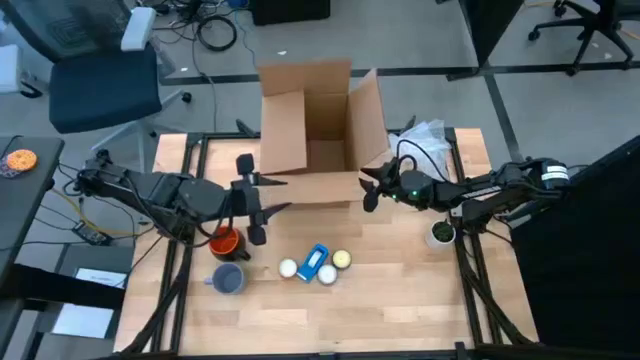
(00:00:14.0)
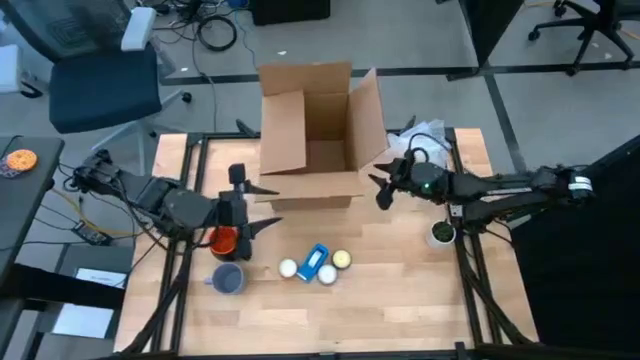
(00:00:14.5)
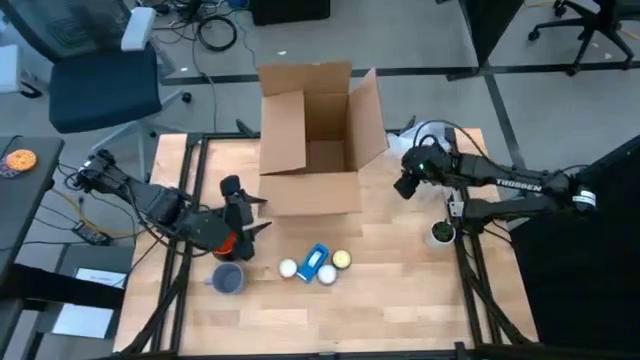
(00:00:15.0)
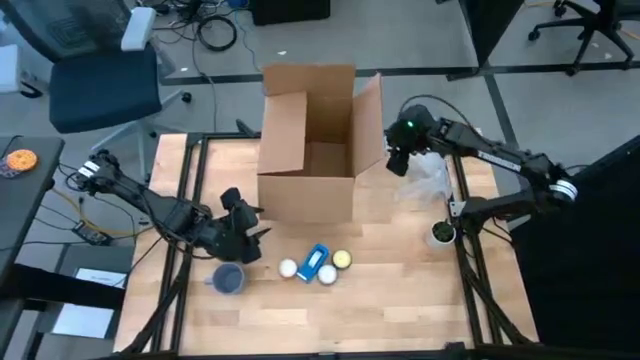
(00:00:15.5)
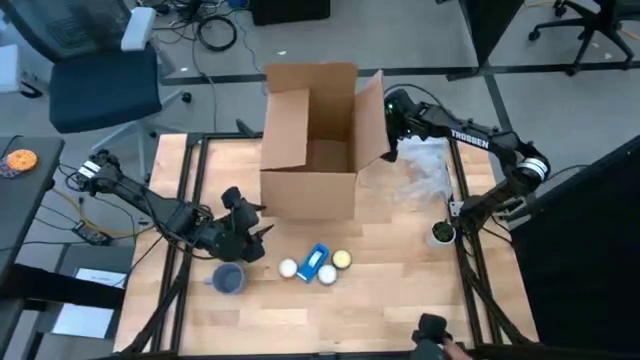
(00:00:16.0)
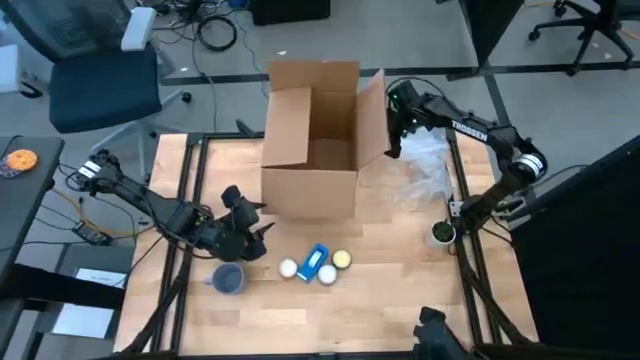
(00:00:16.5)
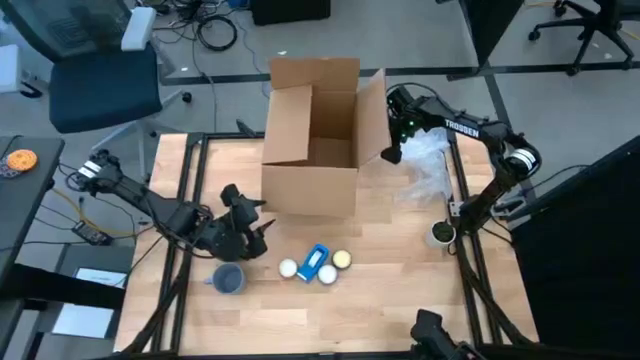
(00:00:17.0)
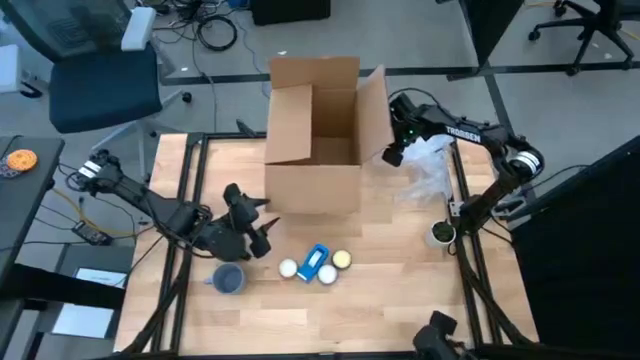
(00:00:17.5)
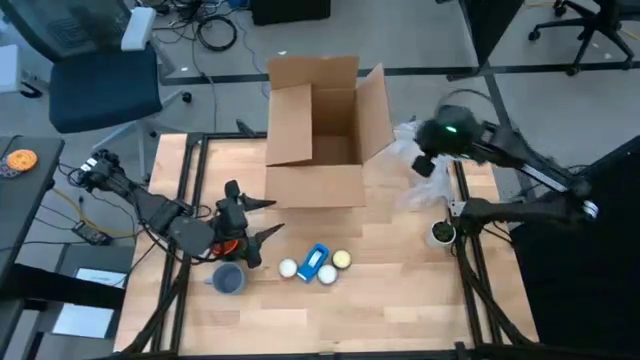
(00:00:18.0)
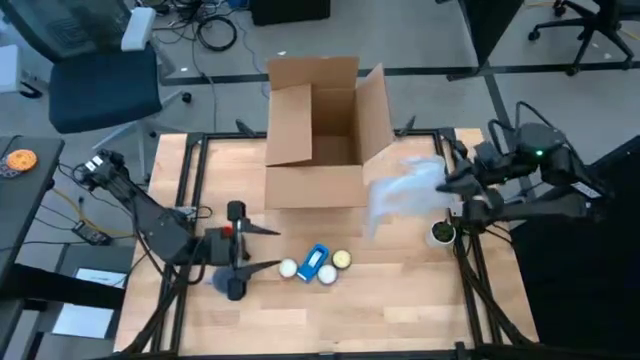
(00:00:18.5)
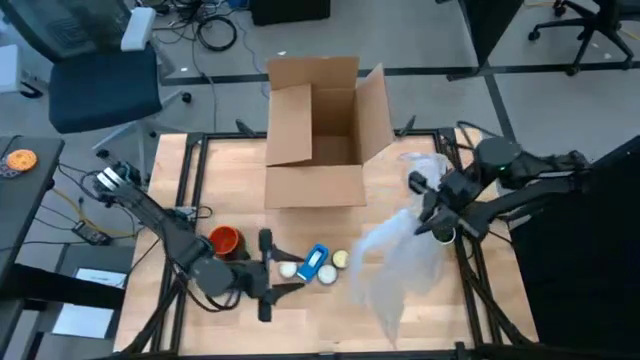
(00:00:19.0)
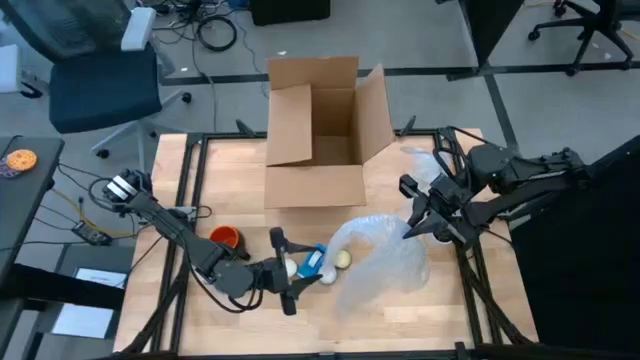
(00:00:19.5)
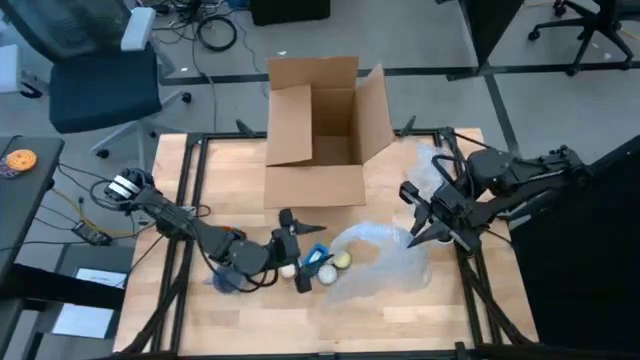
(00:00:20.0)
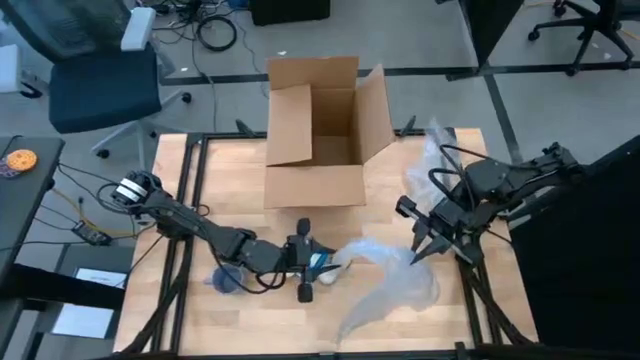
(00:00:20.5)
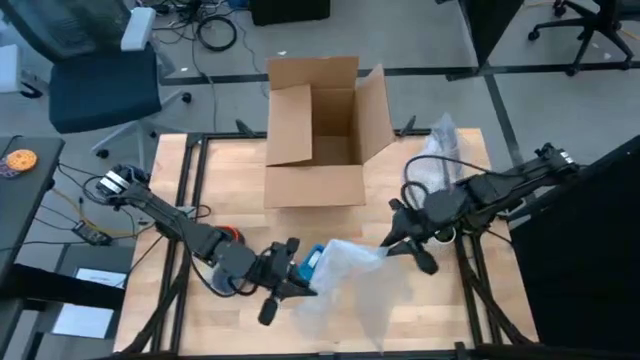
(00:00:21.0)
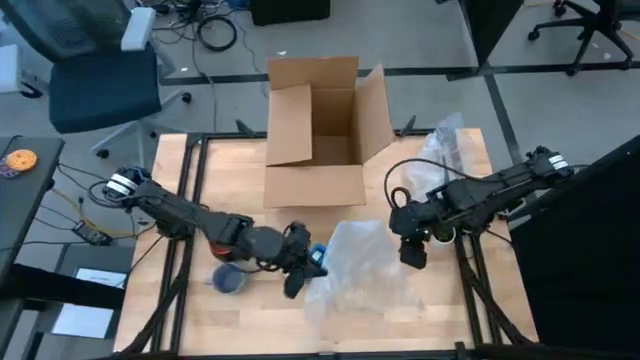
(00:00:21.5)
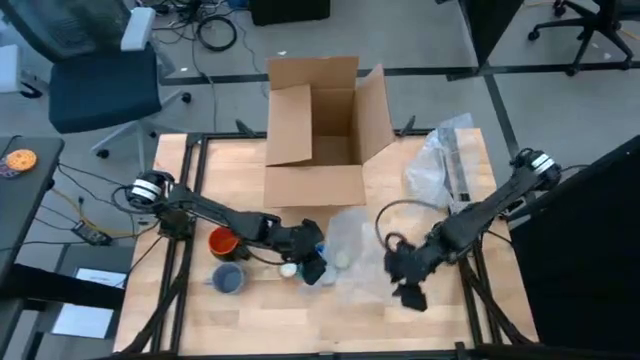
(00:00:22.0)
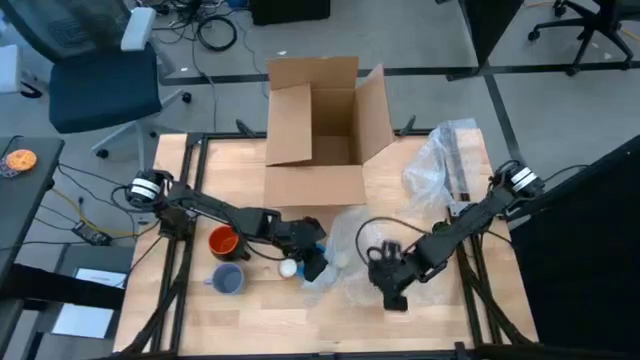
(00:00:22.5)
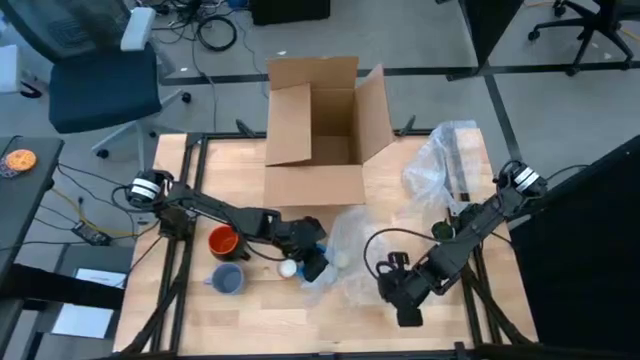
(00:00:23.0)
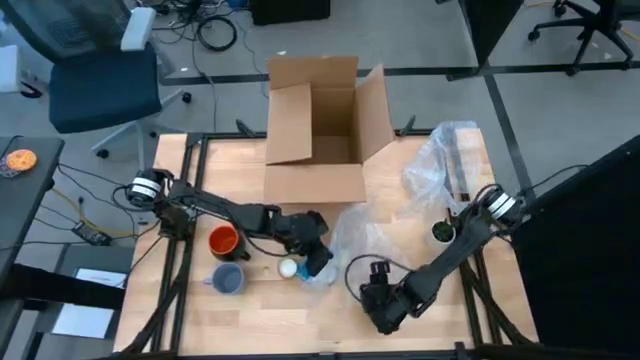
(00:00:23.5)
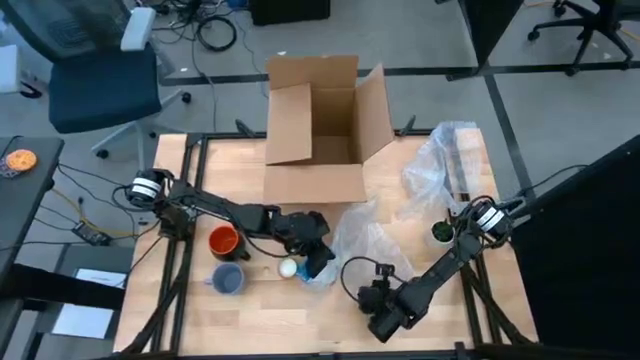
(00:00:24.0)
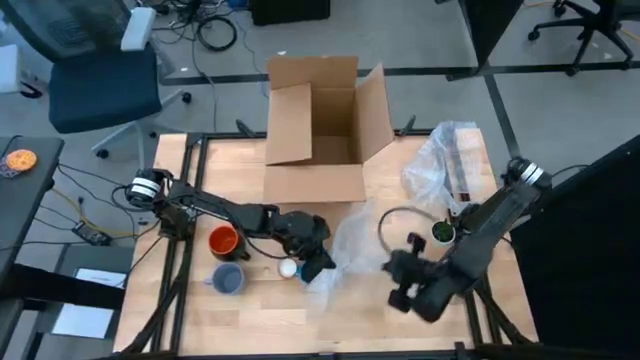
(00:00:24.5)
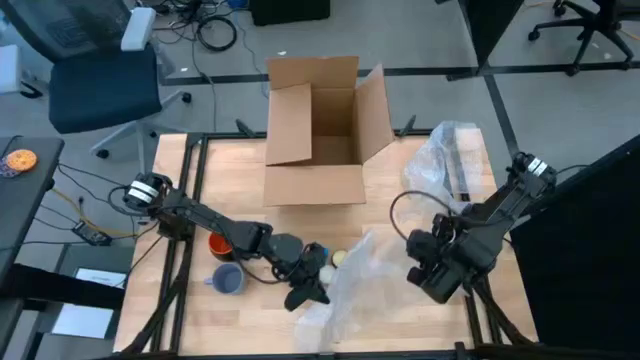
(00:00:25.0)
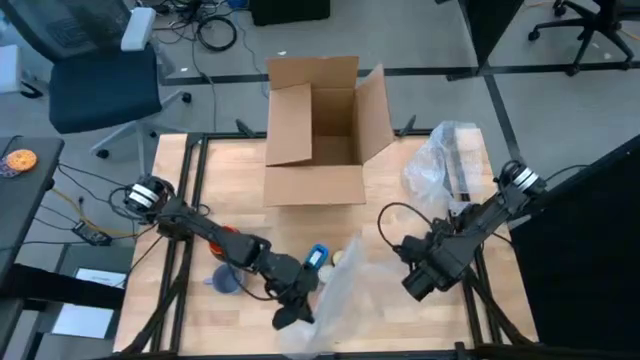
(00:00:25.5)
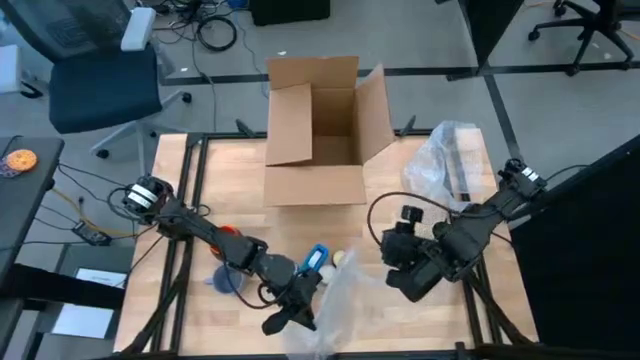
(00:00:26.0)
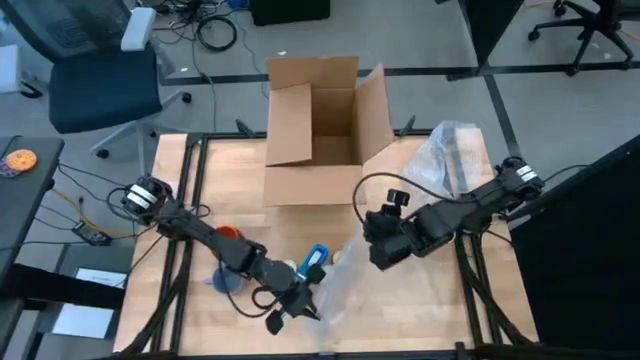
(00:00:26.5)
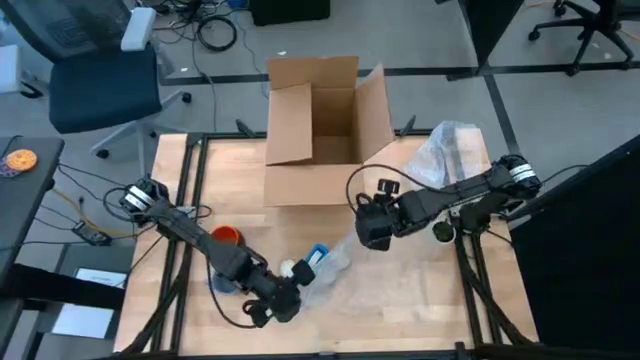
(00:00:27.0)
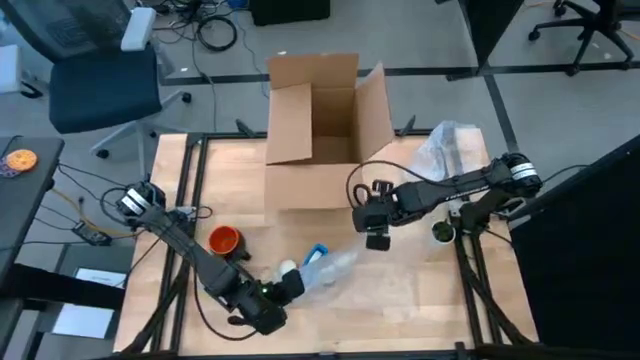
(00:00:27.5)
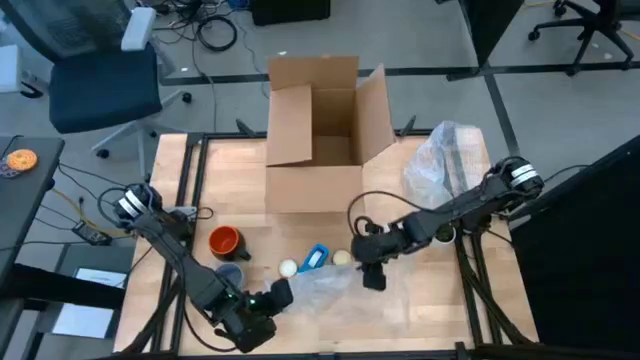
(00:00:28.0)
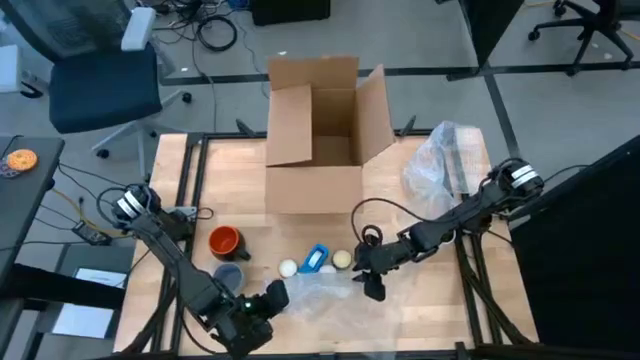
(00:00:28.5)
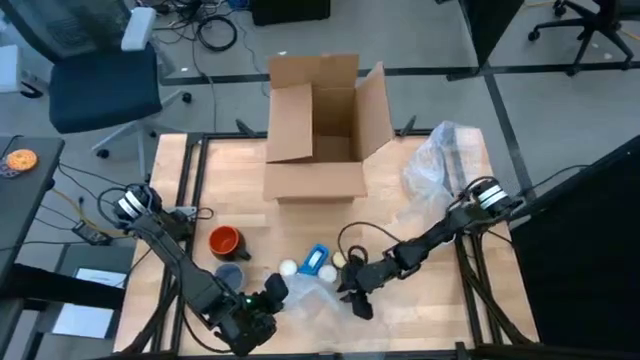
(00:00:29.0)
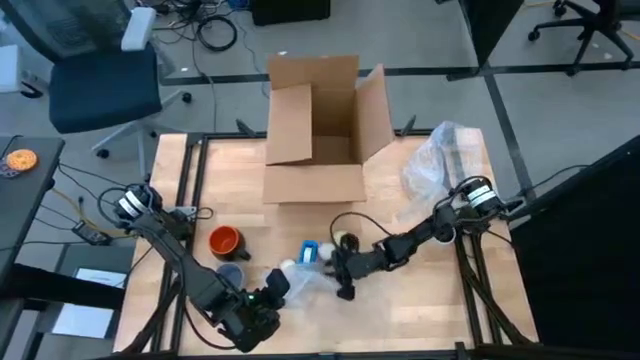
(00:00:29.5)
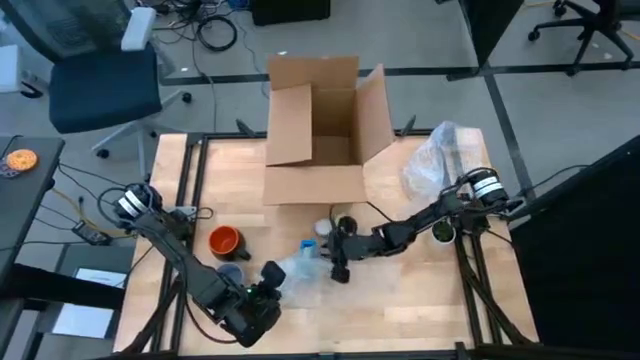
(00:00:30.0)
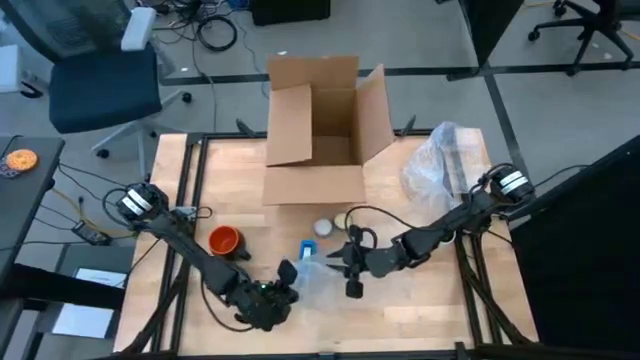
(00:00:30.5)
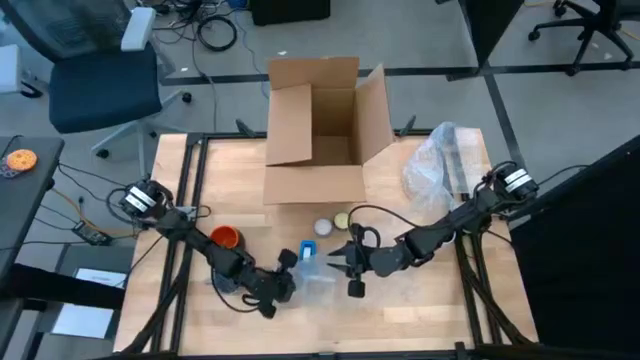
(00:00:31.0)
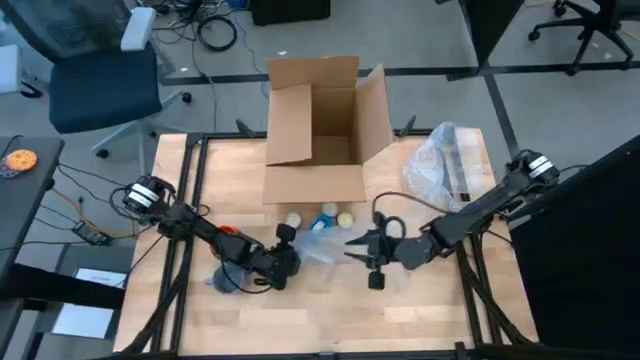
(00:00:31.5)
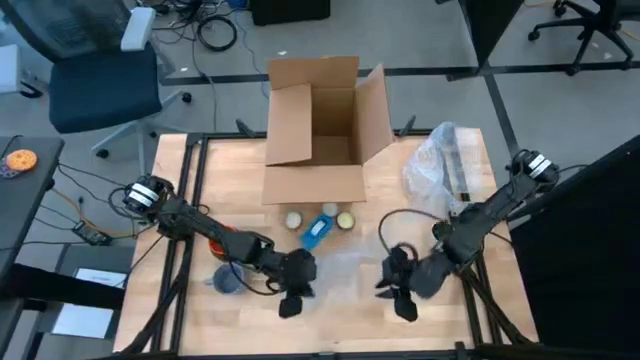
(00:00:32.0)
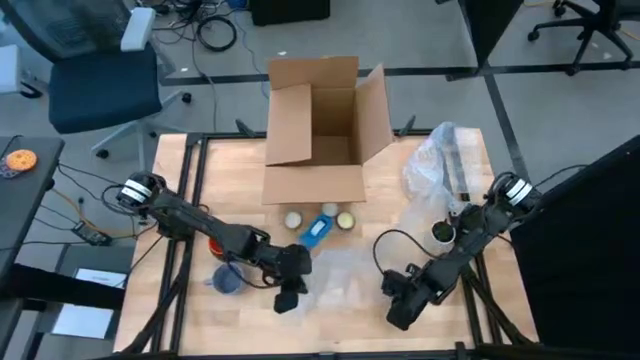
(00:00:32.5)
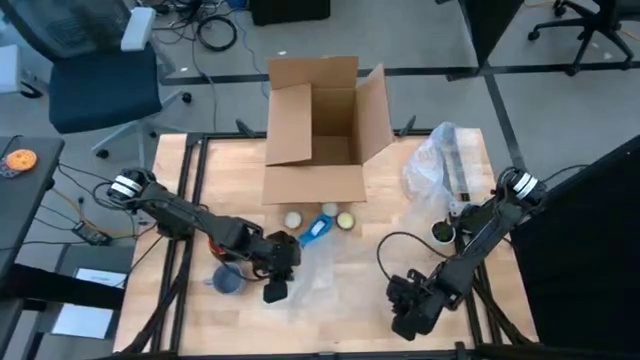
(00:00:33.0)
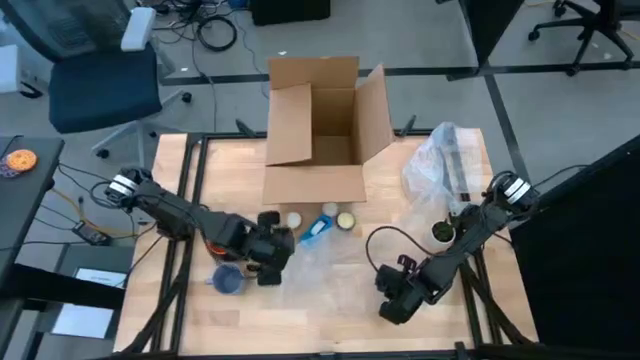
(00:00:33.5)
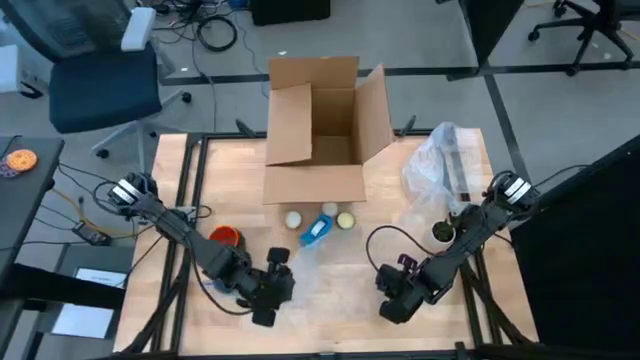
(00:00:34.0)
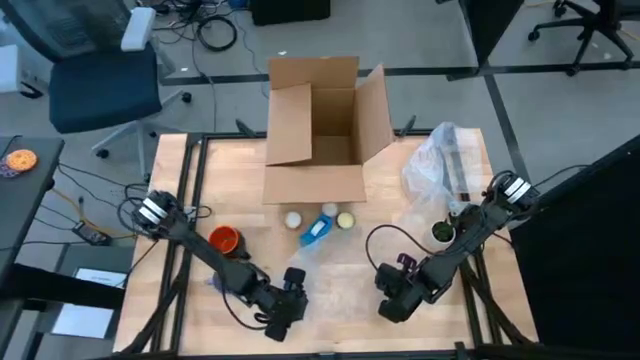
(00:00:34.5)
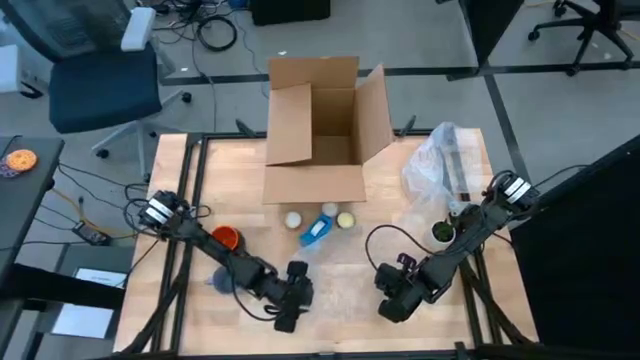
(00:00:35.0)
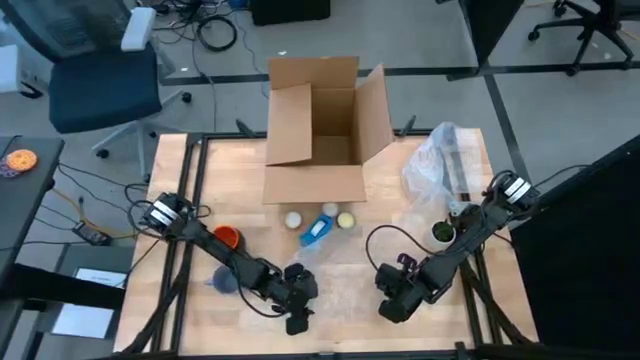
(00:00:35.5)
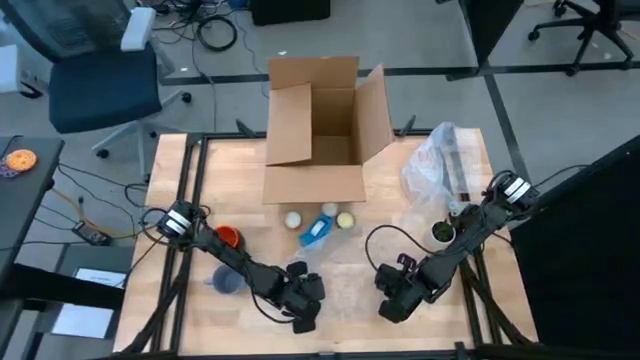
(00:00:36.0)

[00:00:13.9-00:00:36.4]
Task: wrap mug
Wrap the black mug with the bubble wrap
